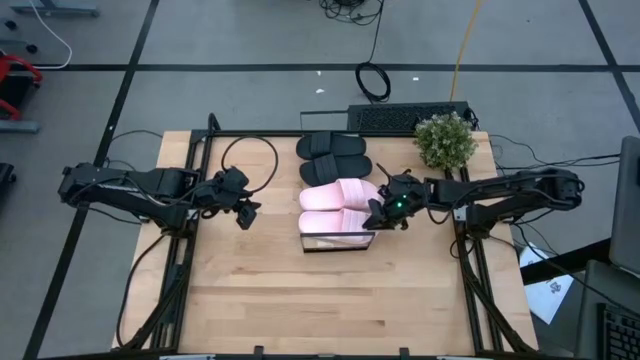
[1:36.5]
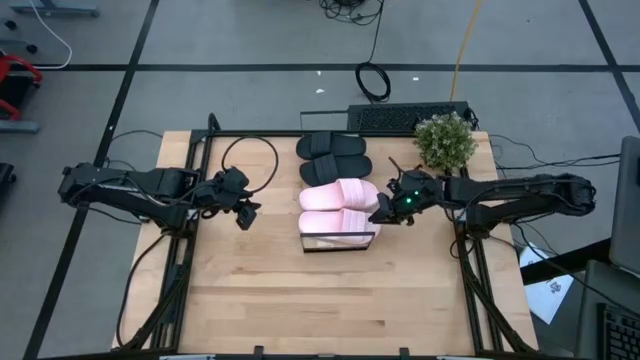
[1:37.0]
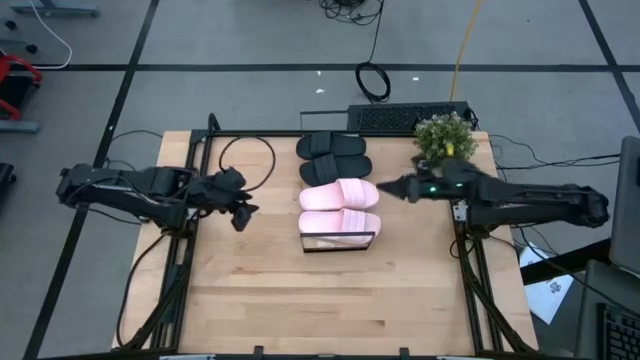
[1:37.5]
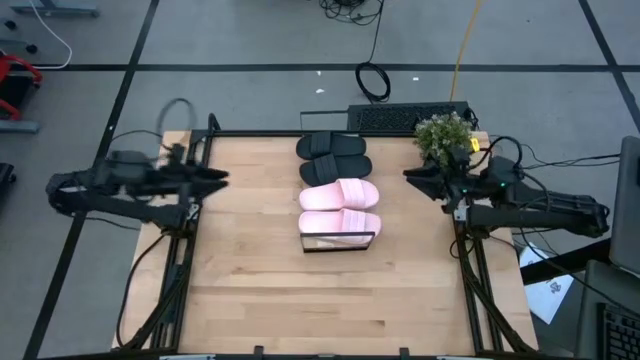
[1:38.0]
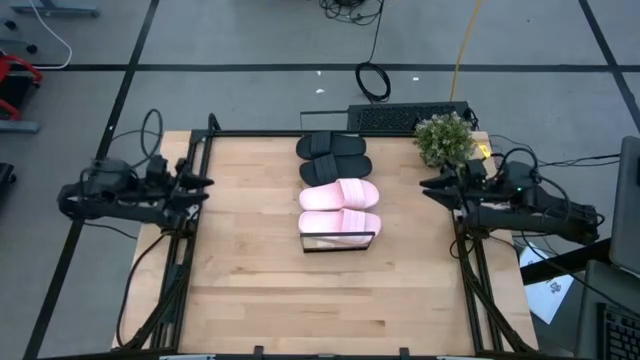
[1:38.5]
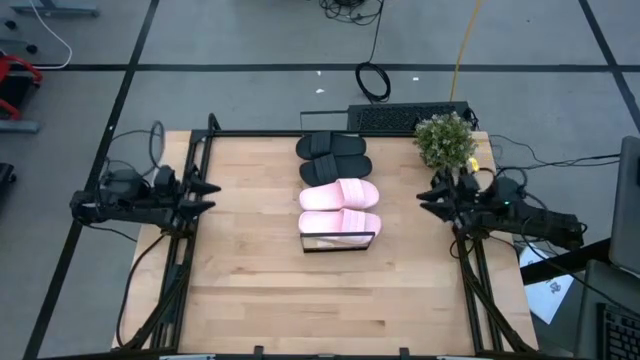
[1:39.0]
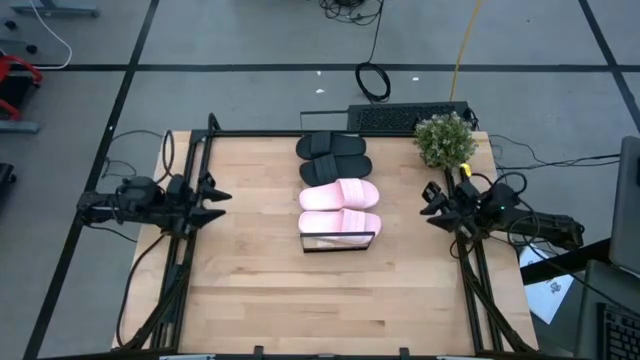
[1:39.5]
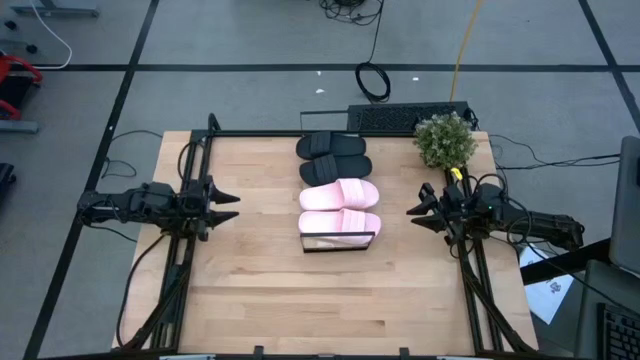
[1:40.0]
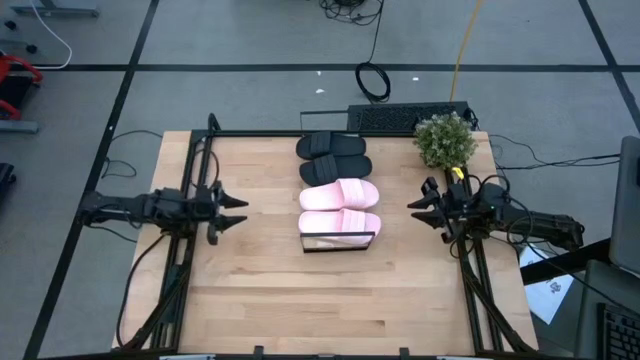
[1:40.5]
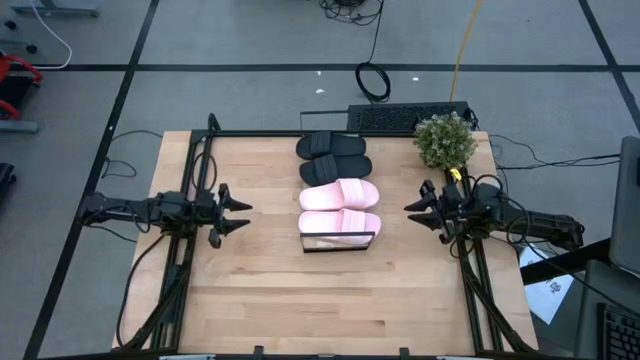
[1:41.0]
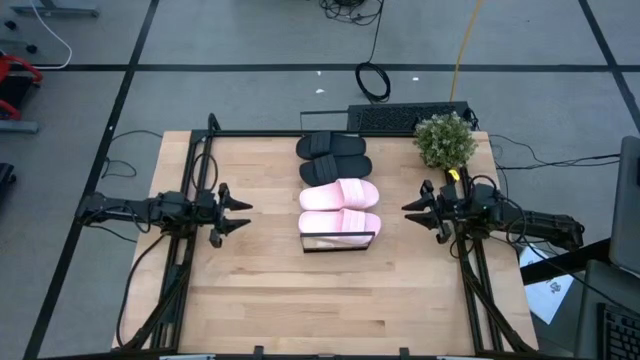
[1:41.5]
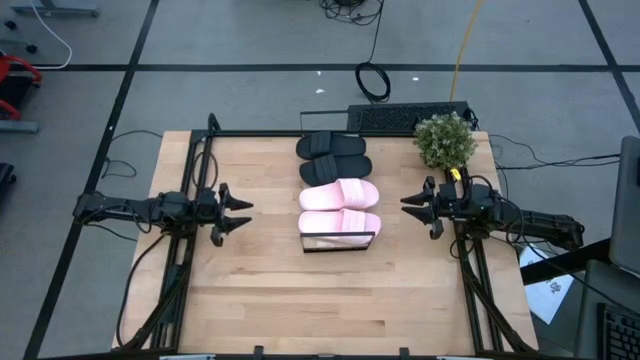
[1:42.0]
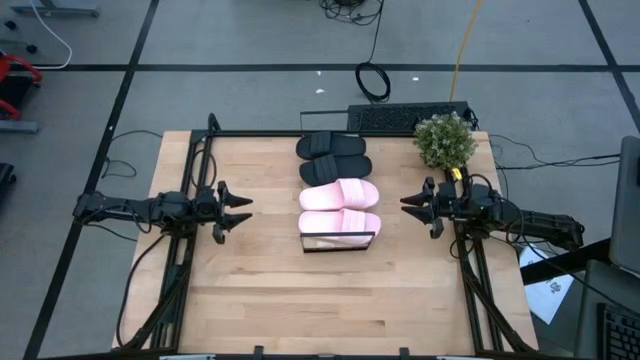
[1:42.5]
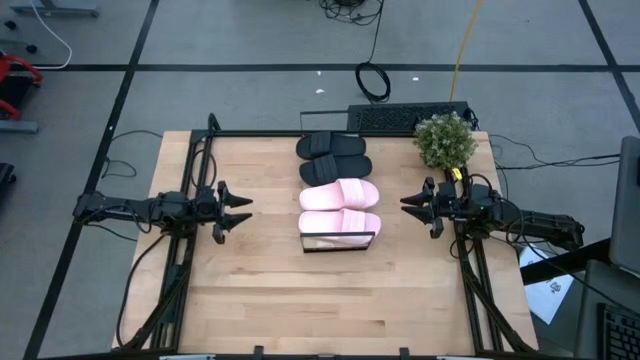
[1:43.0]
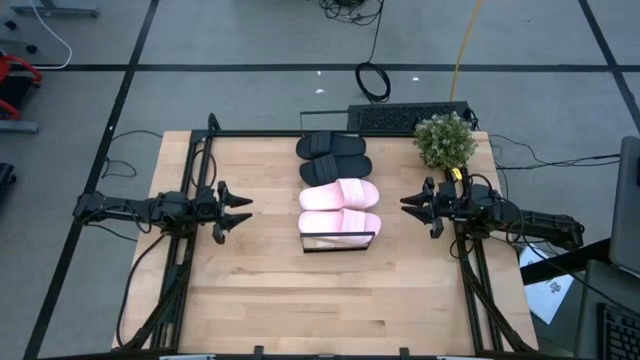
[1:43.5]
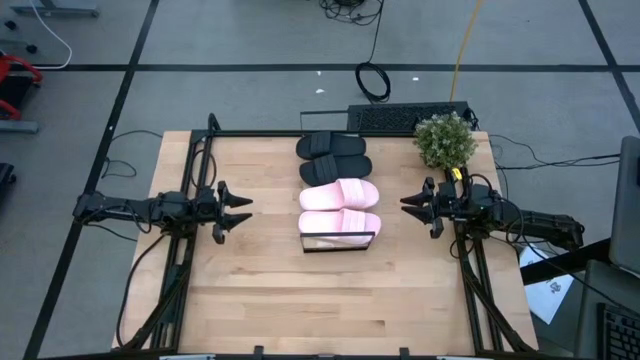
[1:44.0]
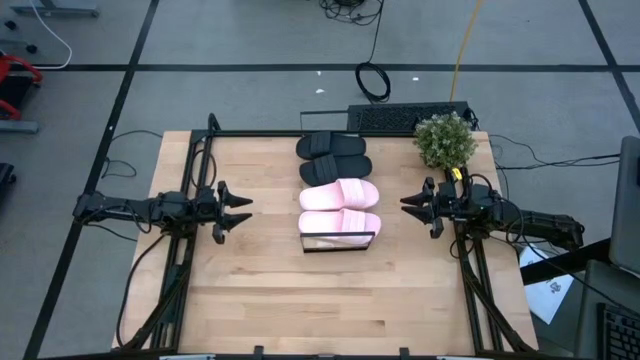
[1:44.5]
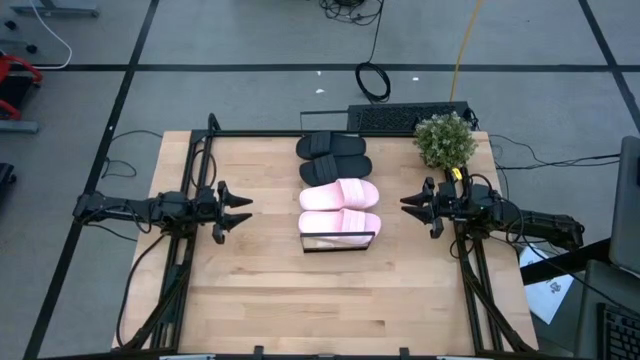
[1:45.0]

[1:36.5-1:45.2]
Task: Pick and place slides into the shelf
Return to Home Position

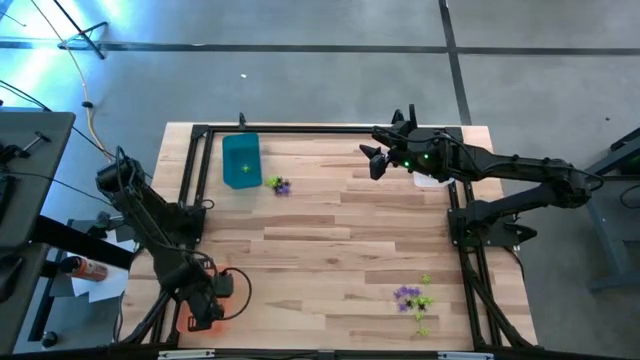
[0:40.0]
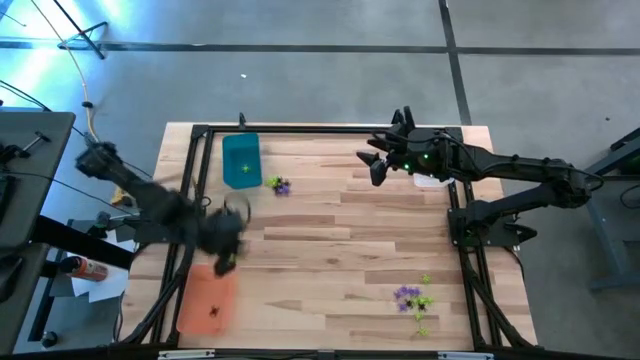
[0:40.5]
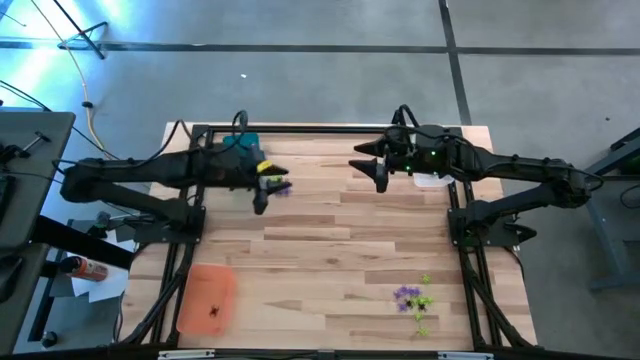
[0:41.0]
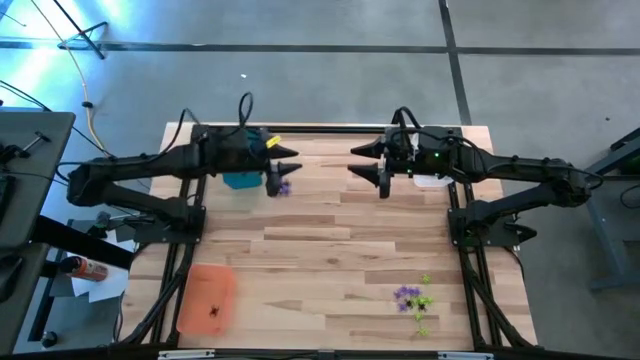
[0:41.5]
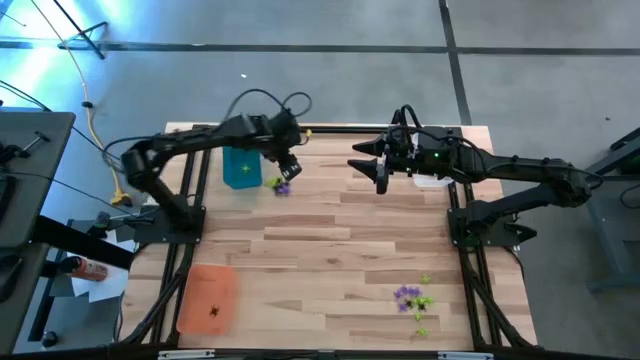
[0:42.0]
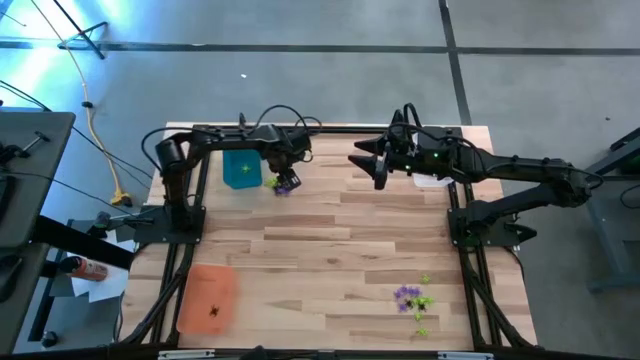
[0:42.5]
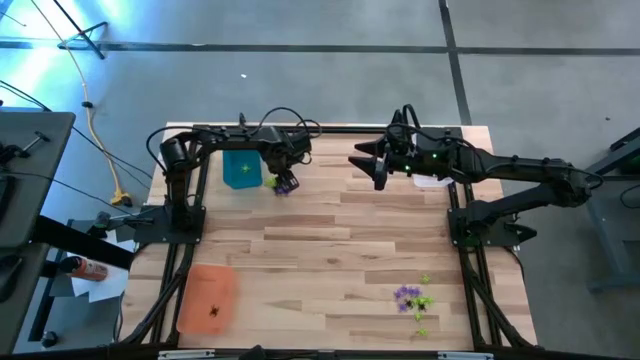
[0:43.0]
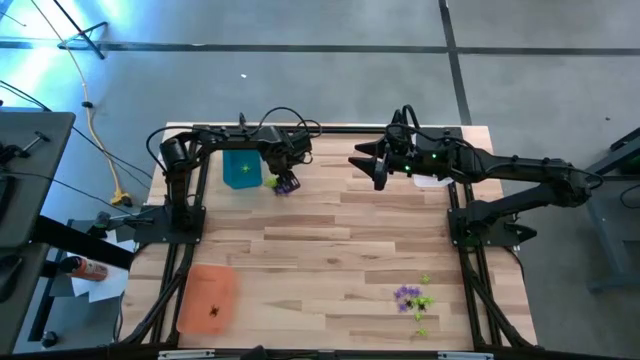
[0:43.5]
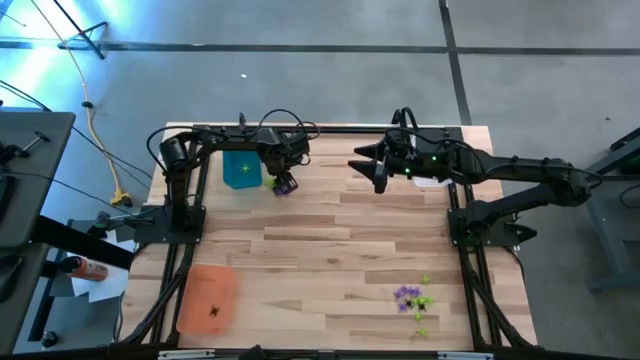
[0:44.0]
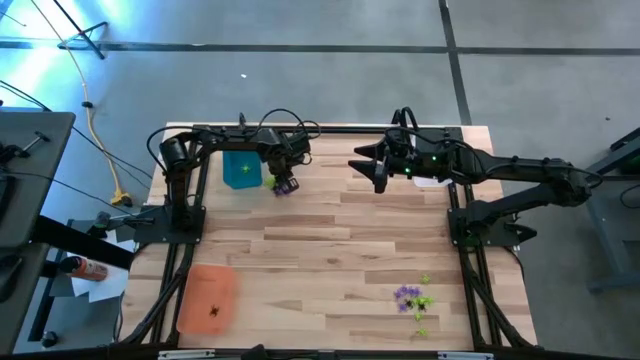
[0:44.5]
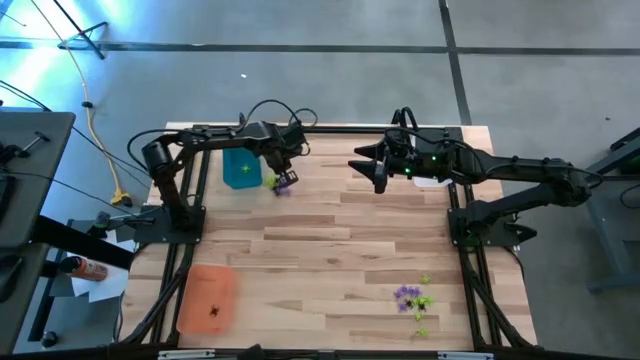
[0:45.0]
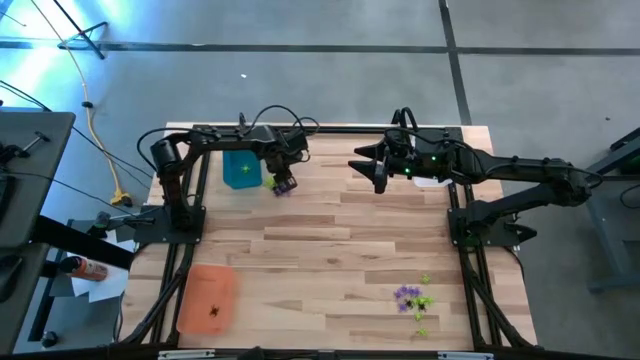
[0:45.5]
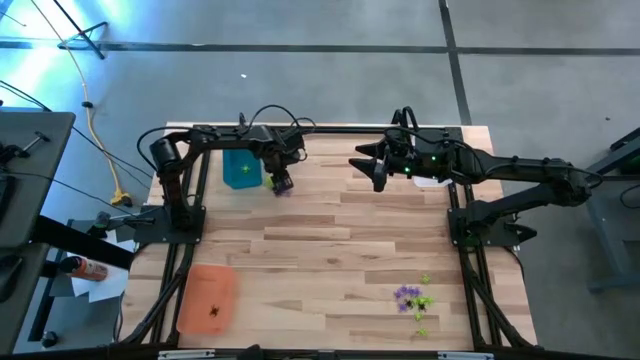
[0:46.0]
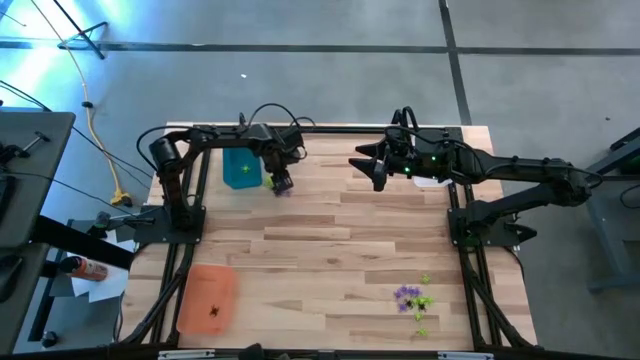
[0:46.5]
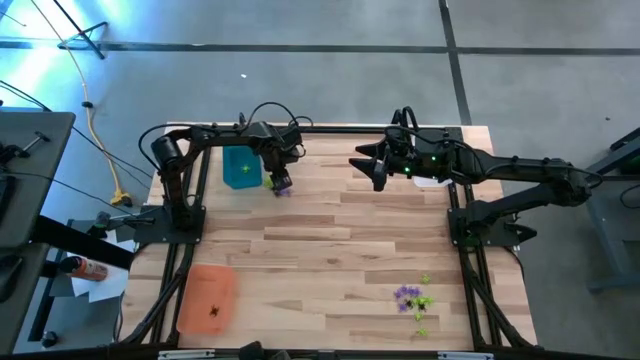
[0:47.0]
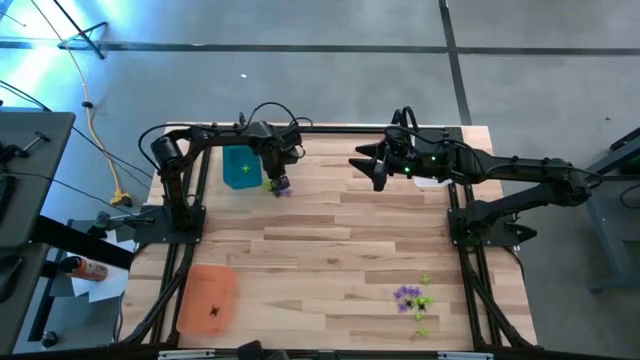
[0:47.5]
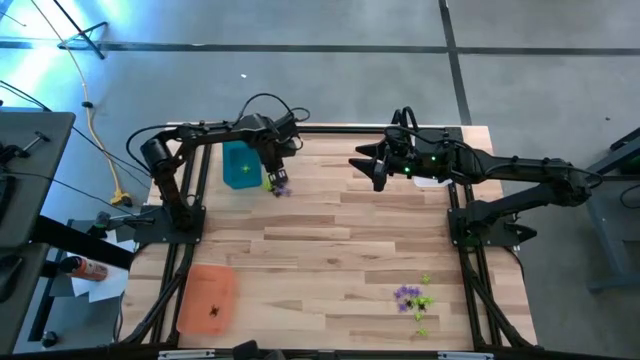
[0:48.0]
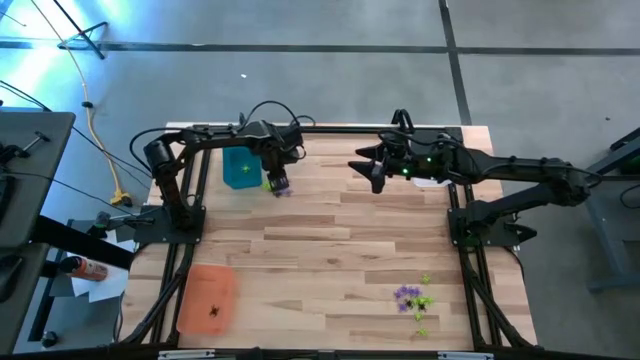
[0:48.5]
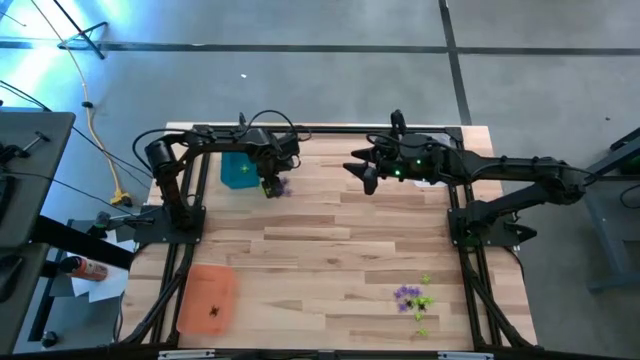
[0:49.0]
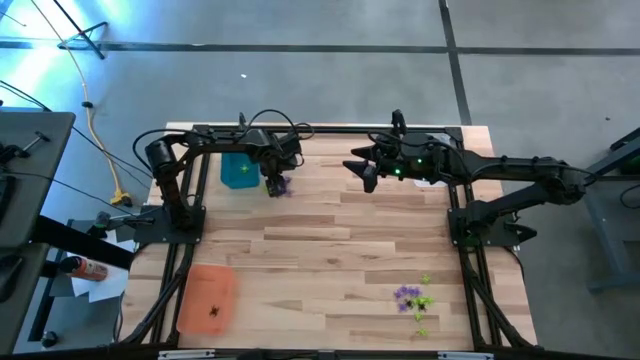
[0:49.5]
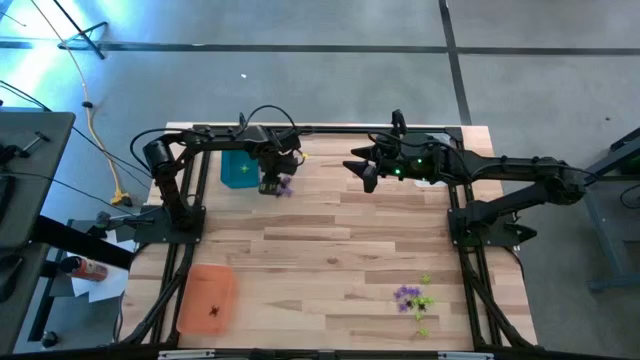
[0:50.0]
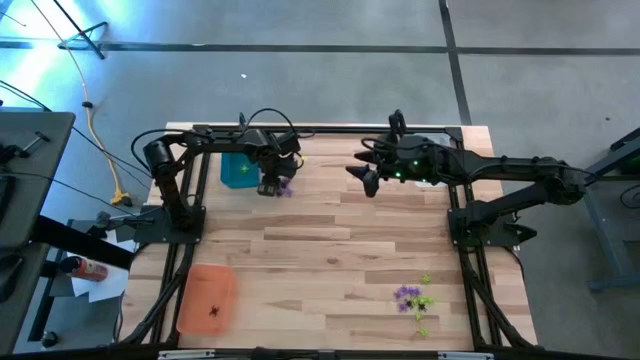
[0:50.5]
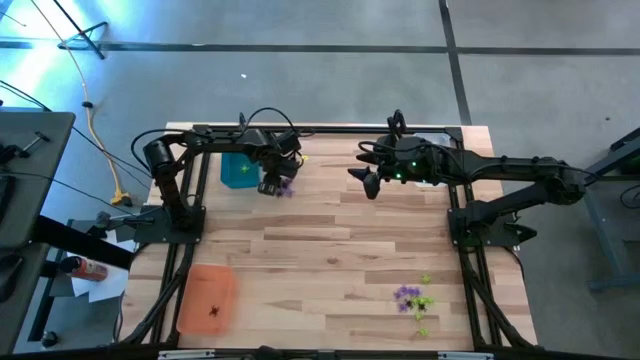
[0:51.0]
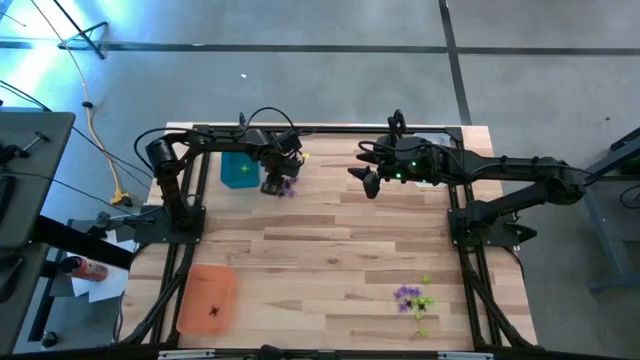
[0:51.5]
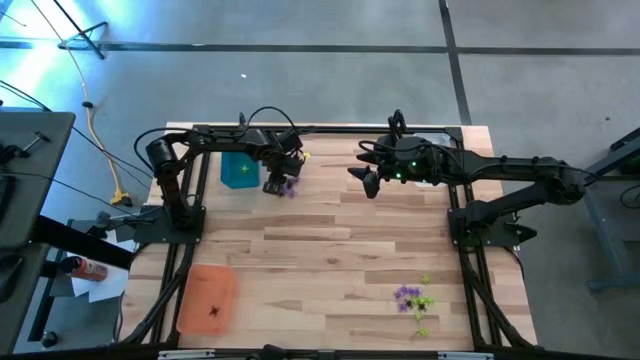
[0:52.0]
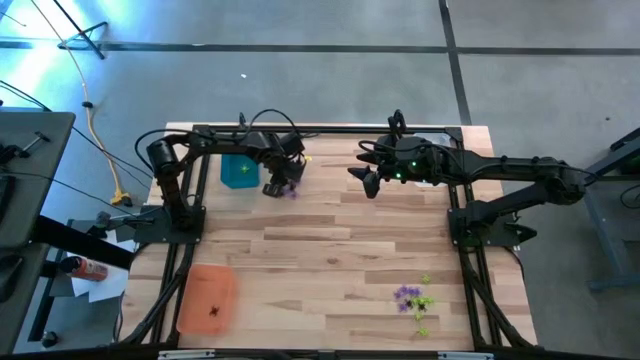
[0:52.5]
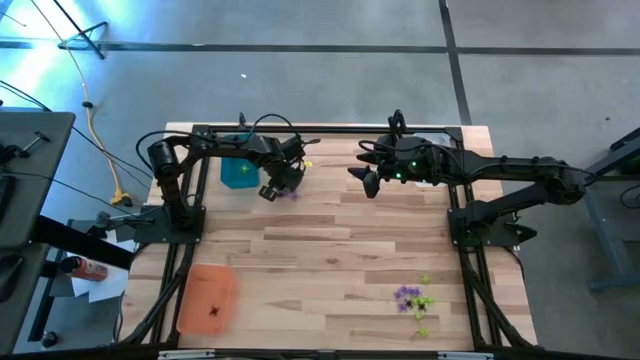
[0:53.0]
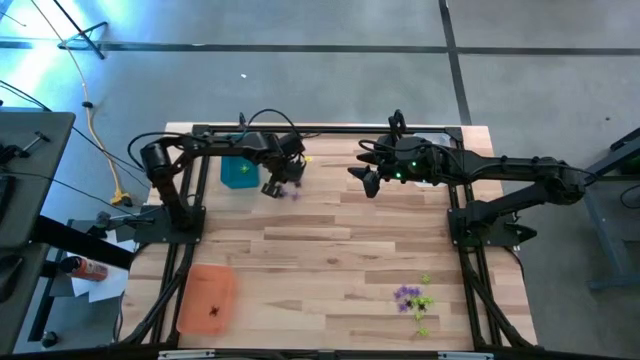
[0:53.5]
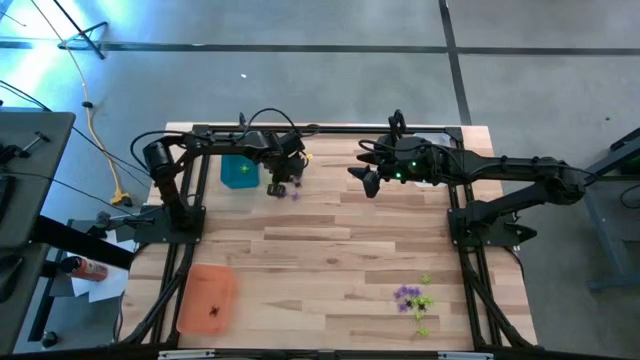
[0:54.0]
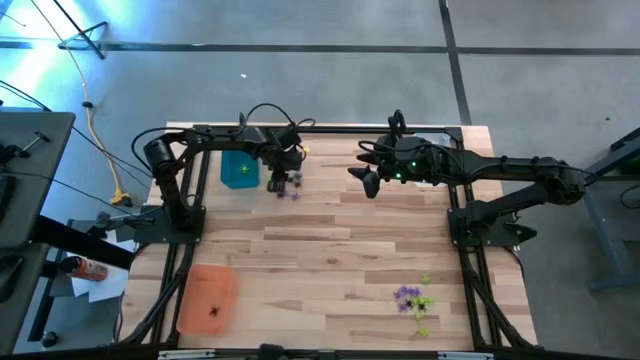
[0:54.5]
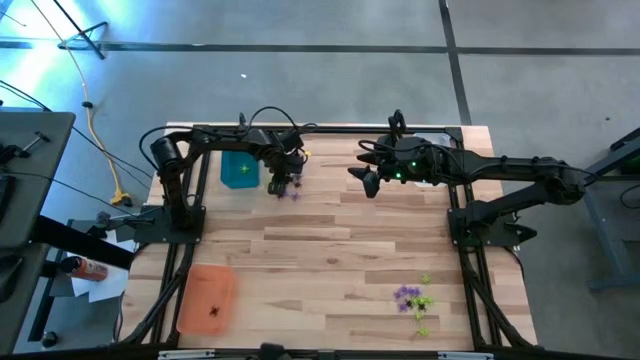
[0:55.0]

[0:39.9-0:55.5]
Task: Sort Halloween decoration
Put the black spider toy into the orange bin
